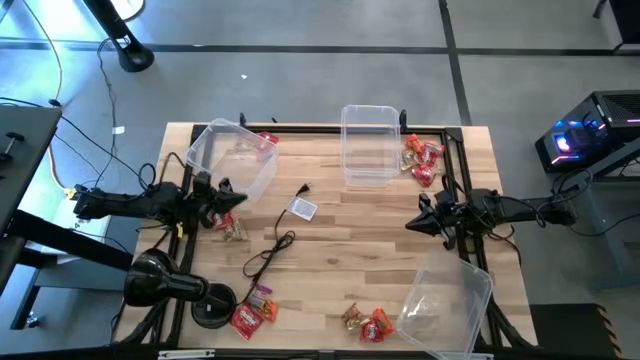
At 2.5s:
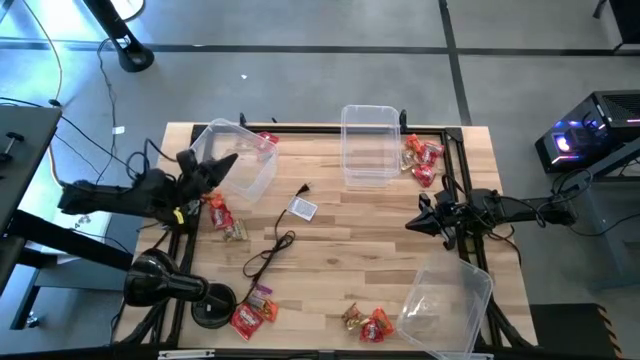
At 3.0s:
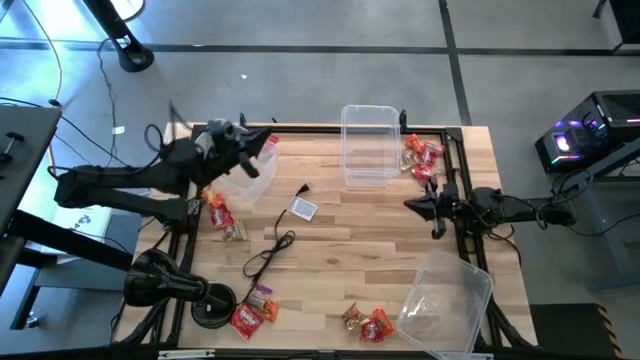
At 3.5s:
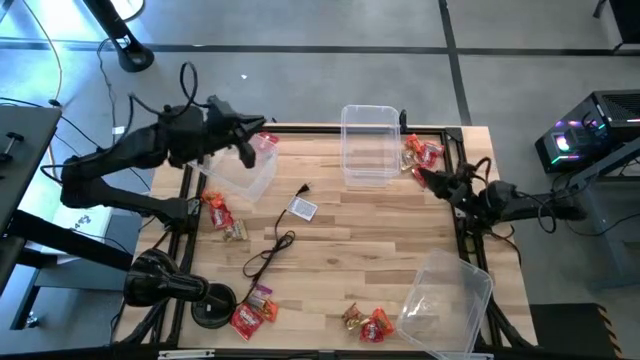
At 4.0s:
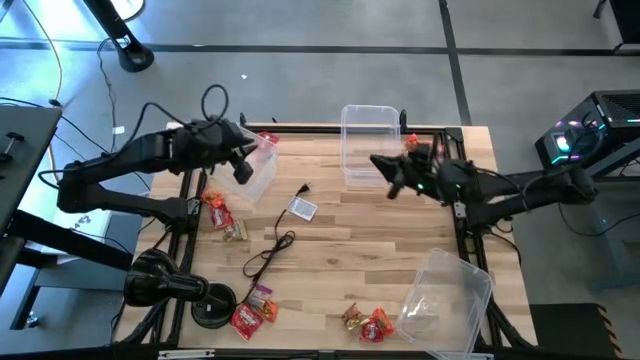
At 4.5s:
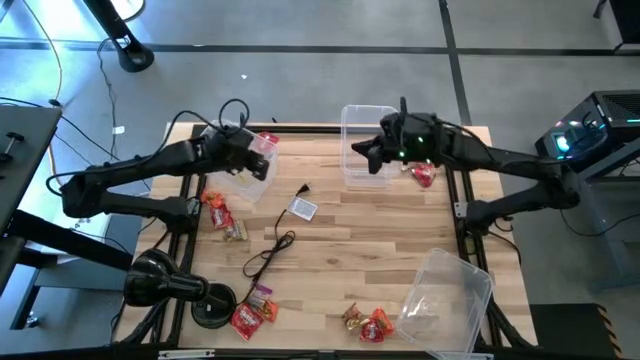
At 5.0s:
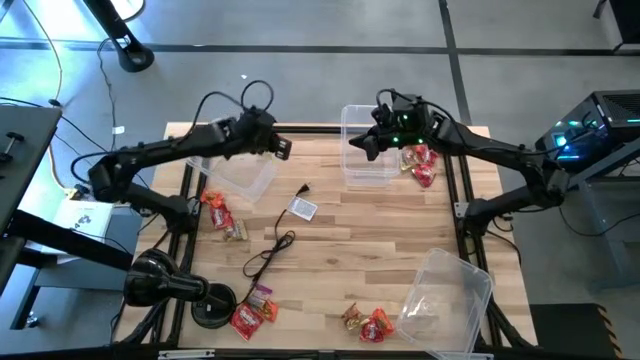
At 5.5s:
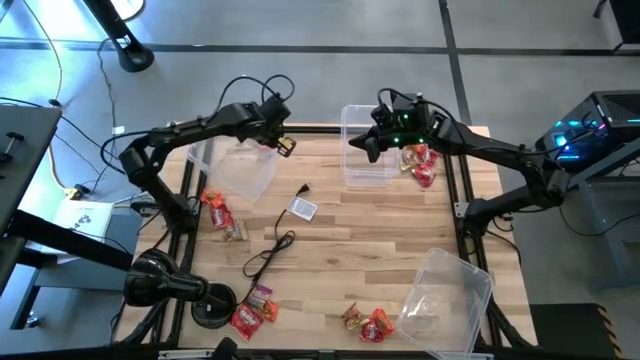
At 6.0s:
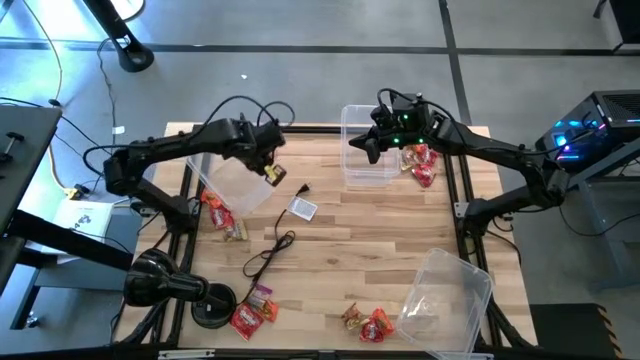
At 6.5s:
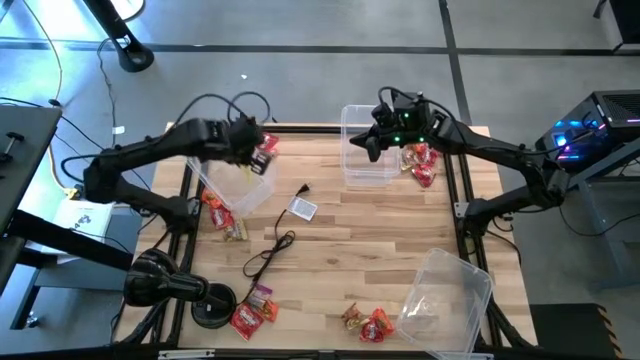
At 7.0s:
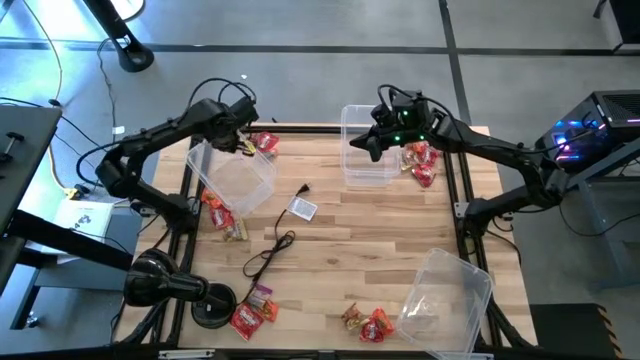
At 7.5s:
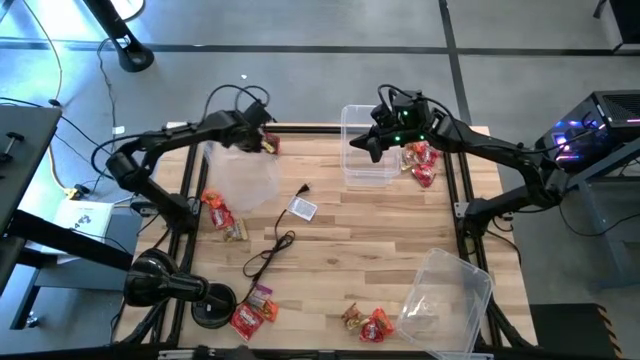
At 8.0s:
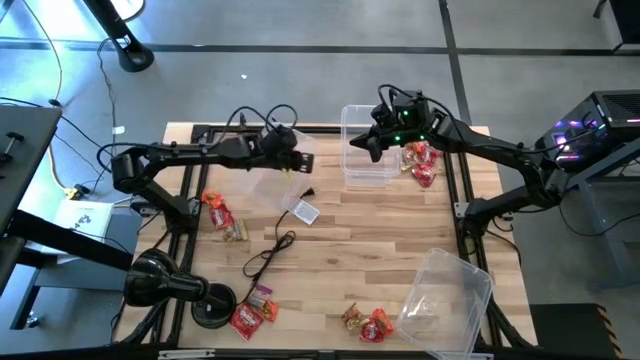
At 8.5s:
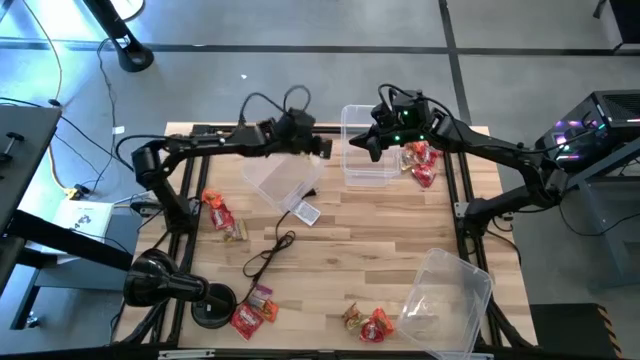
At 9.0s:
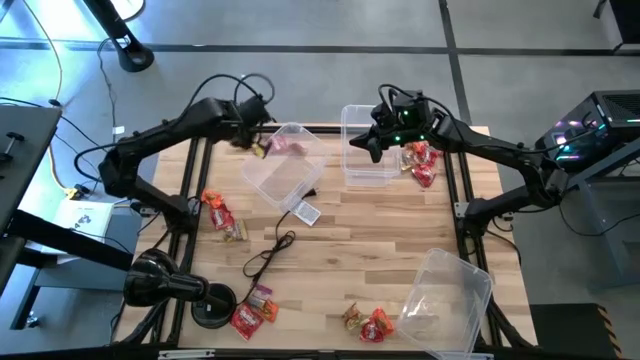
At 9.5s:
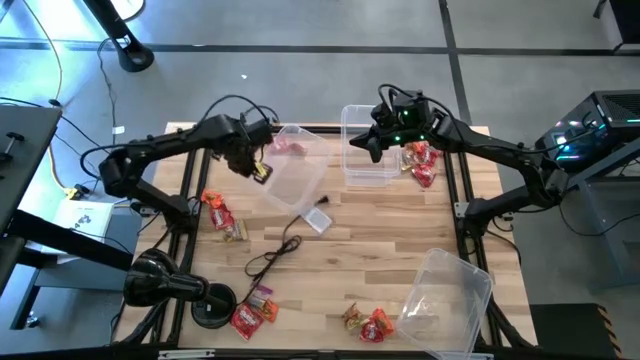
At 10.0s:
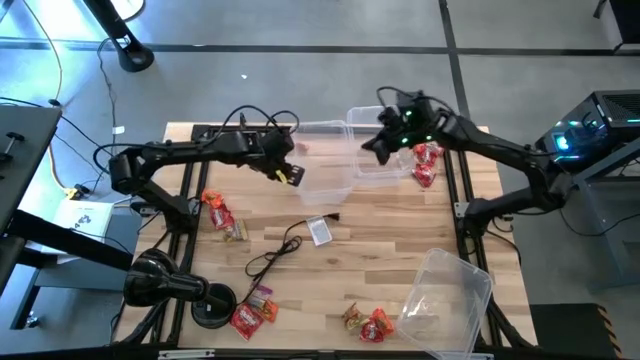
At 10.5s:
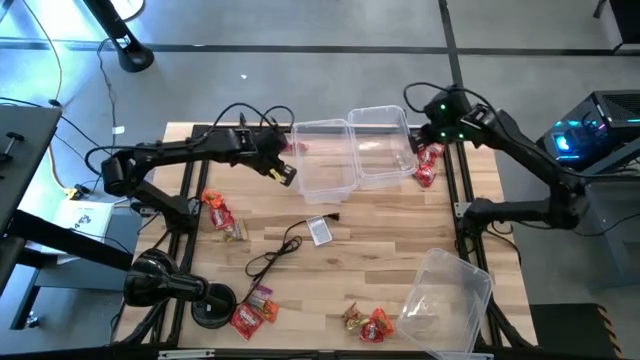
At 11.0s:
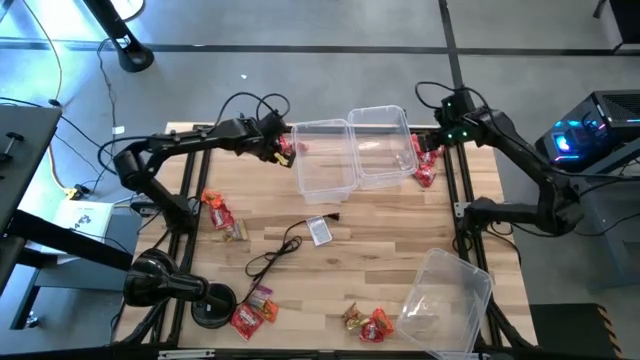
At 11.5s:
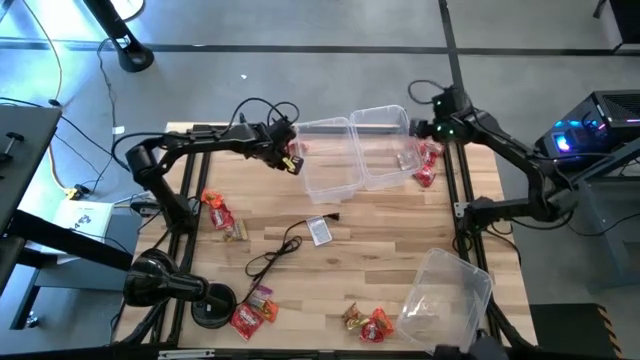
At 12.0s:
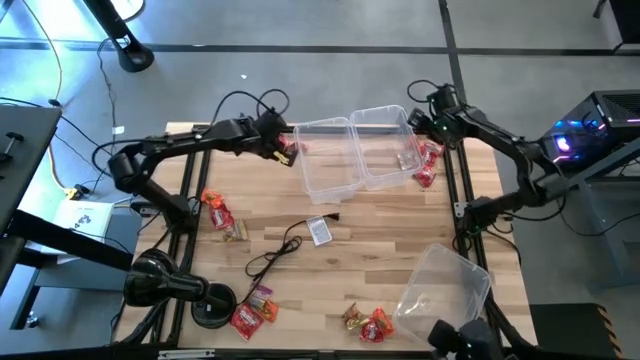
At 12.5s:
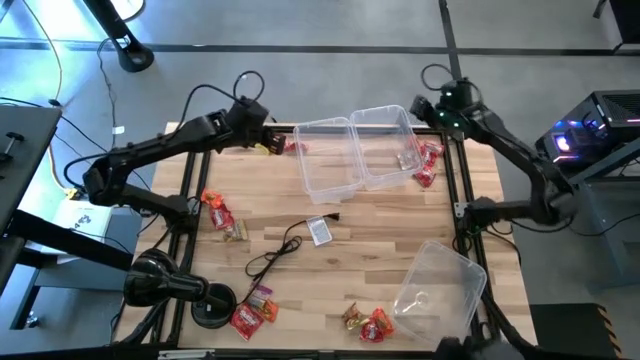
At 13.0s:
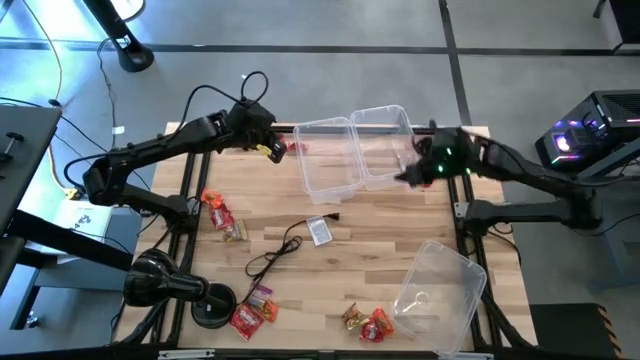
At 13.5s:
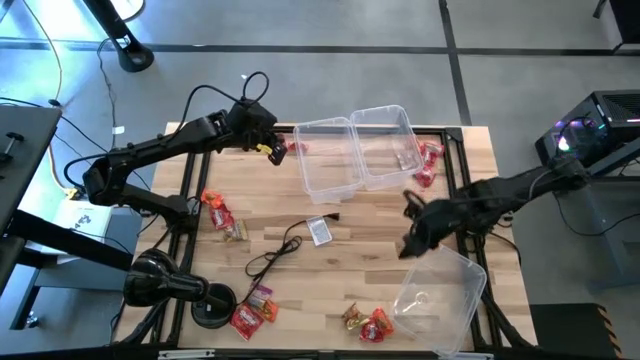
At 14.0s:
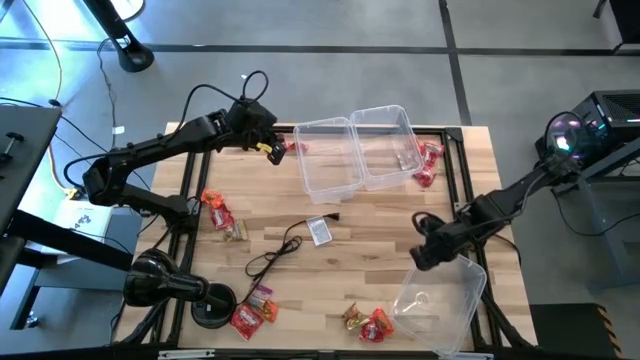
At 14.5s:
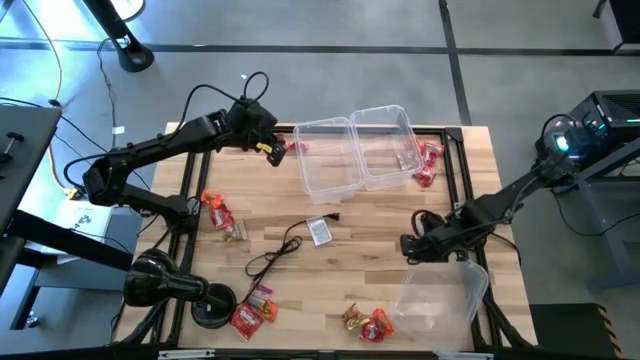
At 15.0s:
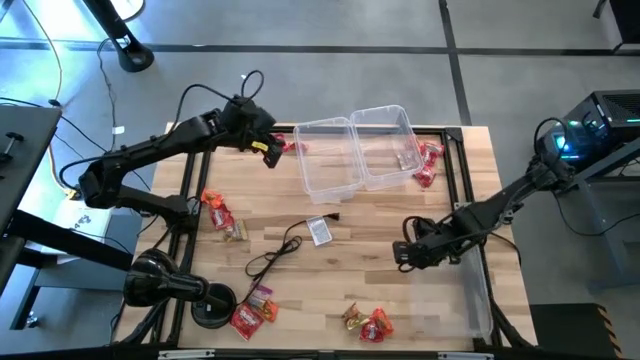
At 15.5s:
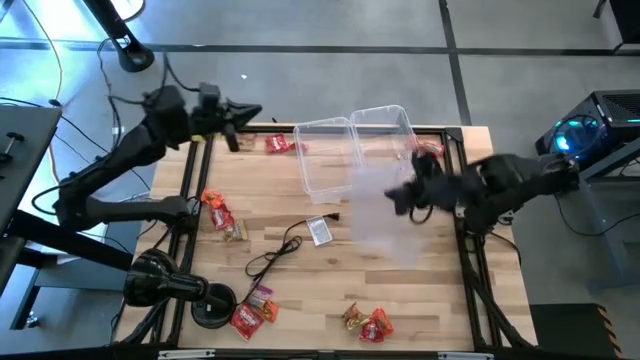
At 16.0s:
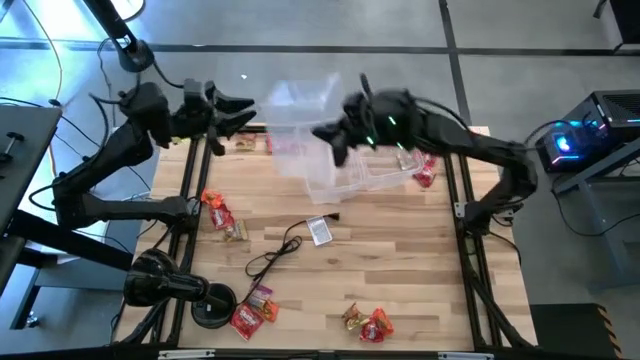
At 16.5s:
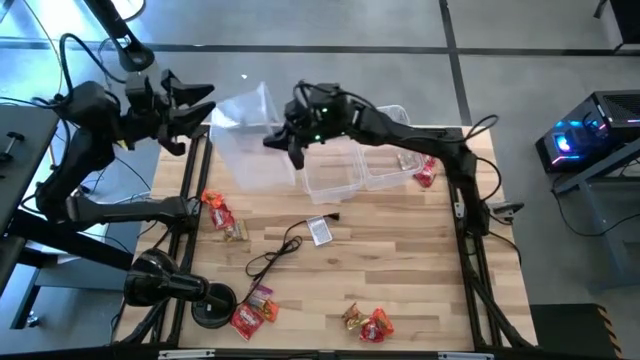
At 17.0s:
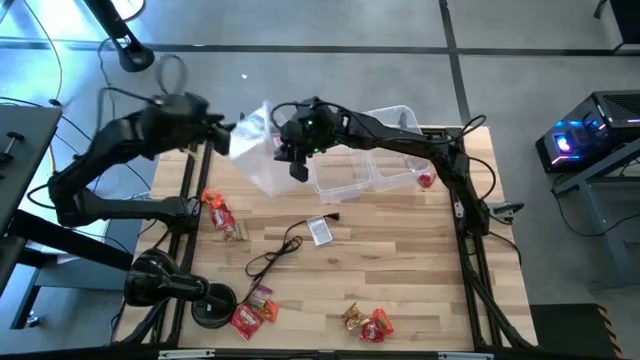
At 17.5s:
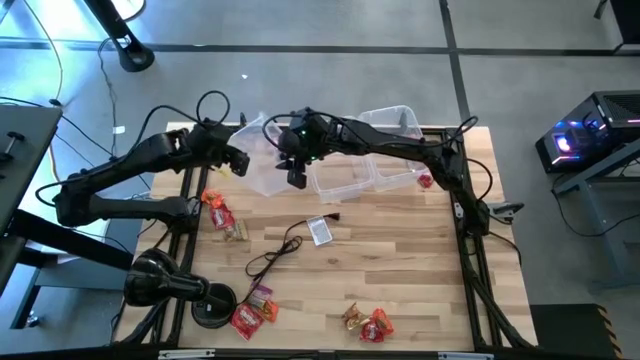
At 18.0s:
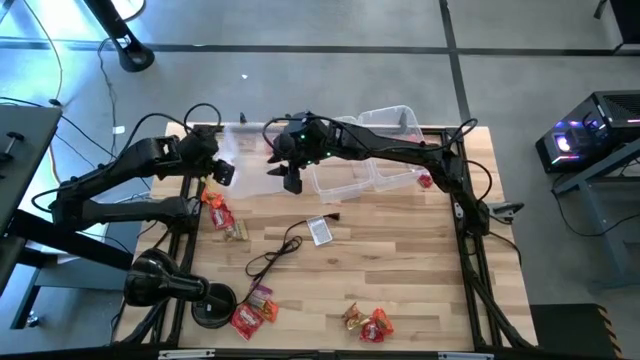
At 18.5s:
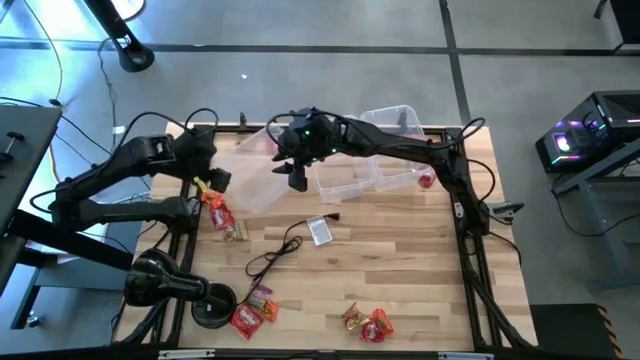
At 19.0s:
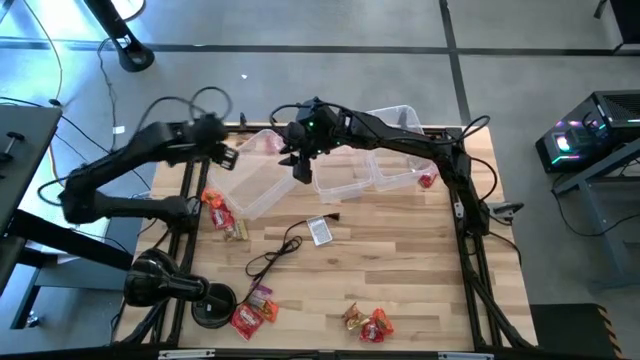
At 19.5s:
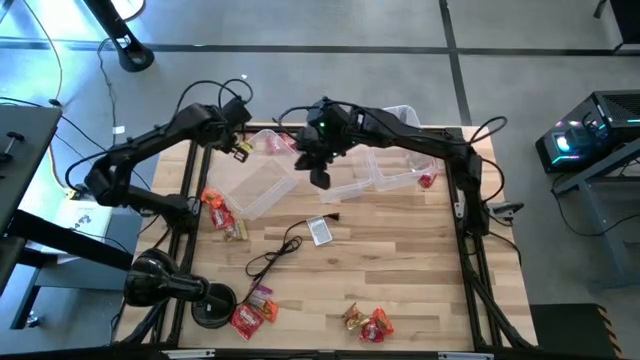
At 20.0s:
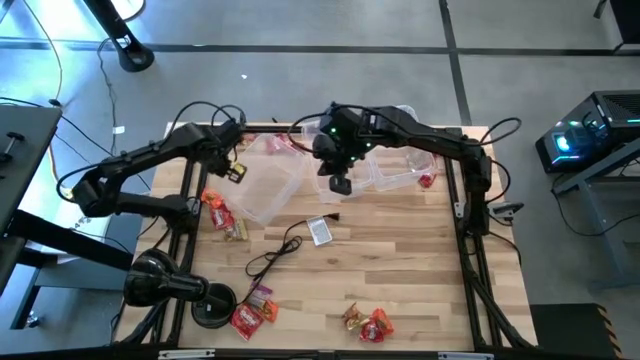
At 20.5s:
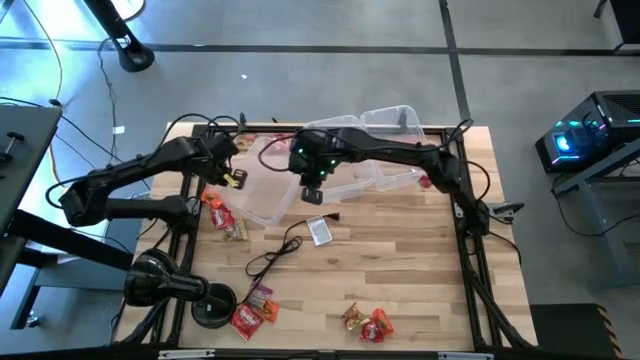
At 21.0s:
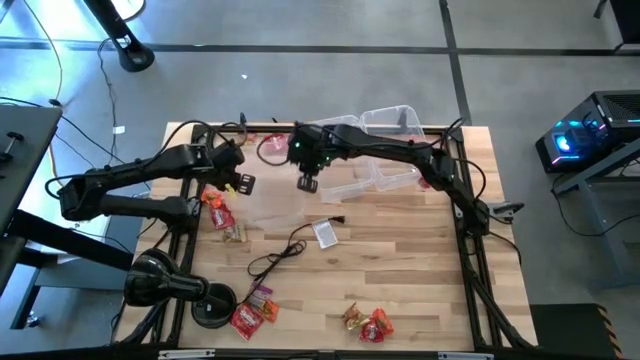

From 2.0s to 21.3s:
Task: Sort candy
Move the top left and bottom right transparent bins to the top center

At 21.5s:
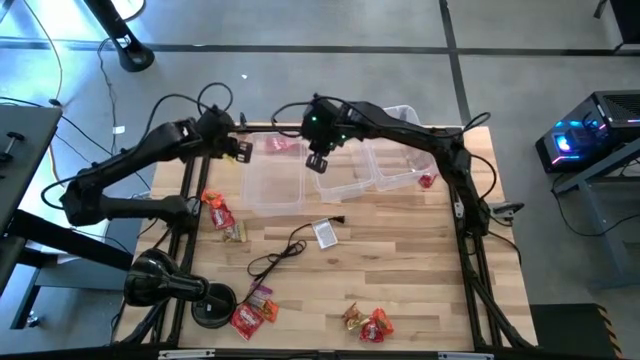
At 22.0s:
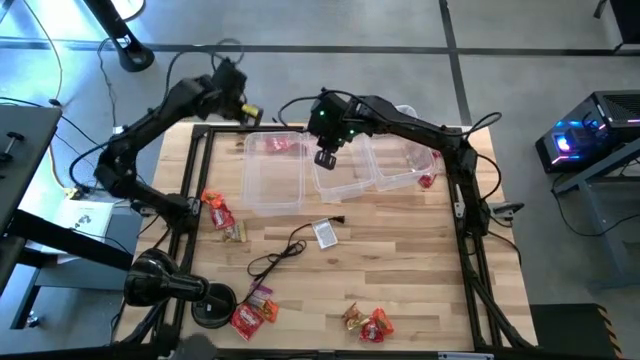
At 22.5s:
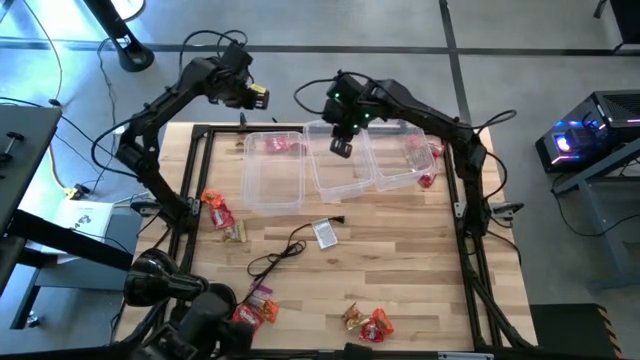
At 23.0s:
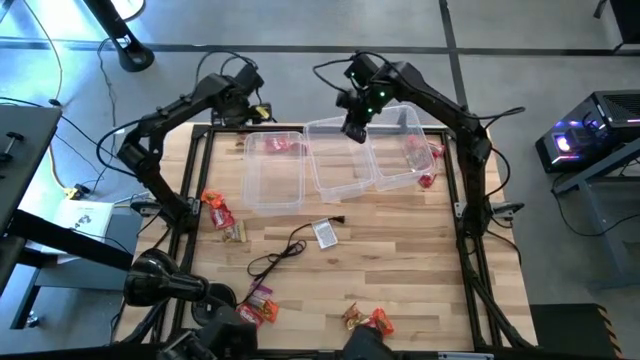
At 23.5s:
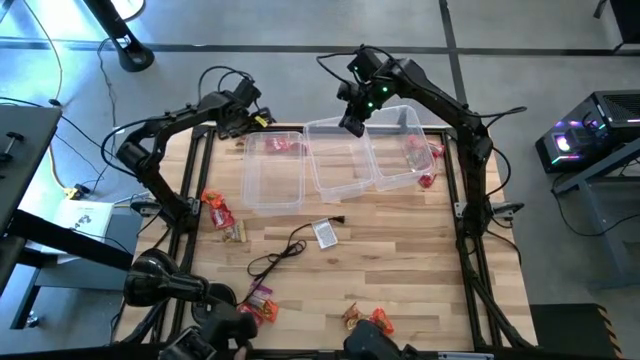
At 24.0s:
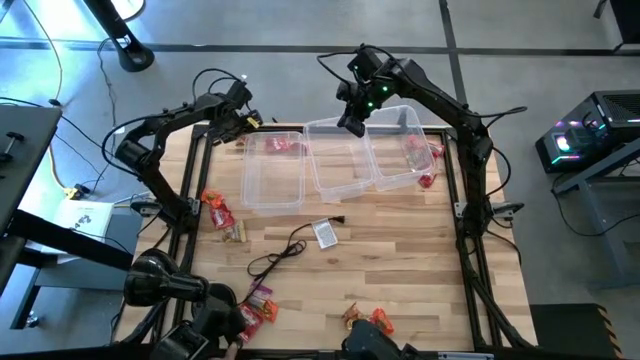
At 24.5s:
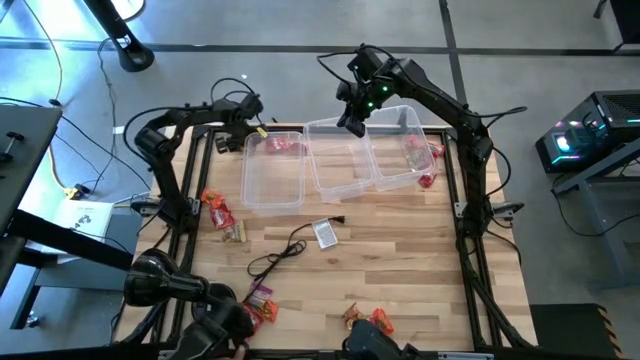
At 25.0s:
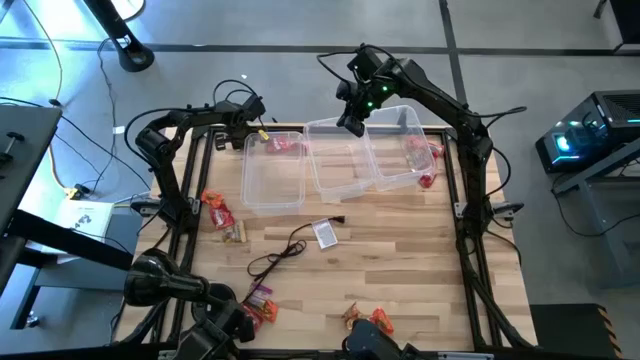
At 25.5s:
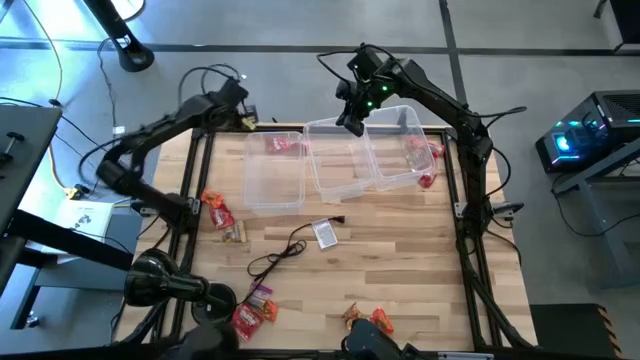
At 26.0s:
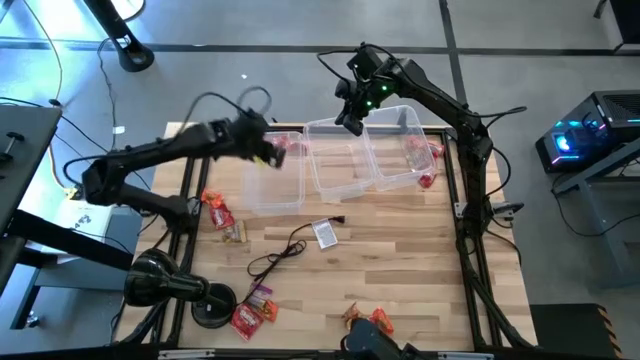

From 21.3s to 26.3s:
Put the gold candy pack into the left transparent bin
